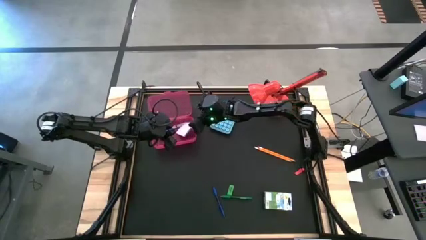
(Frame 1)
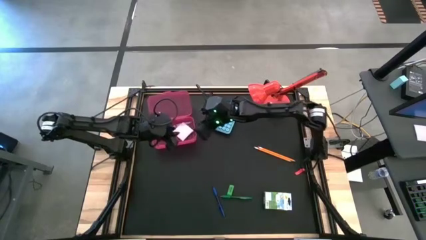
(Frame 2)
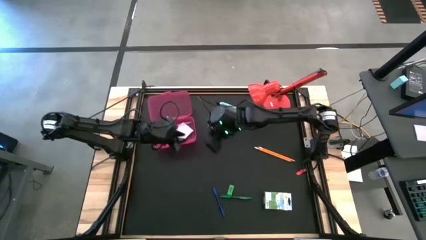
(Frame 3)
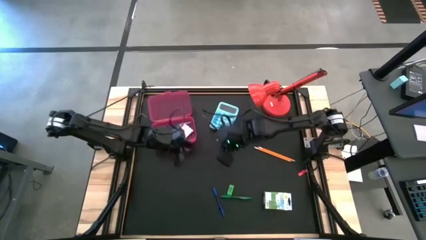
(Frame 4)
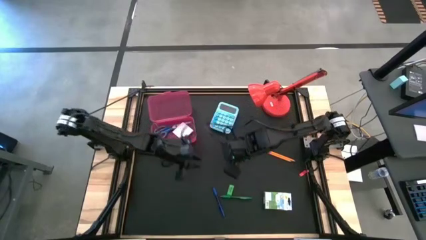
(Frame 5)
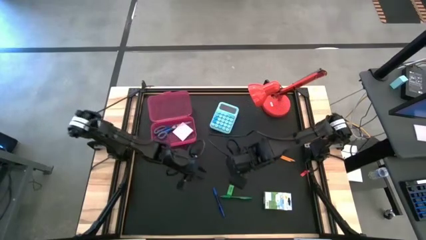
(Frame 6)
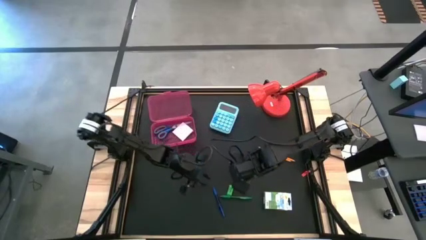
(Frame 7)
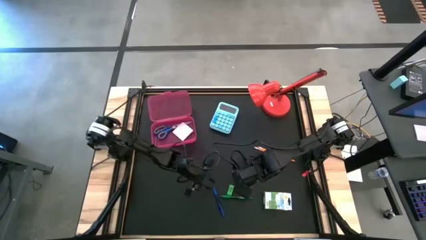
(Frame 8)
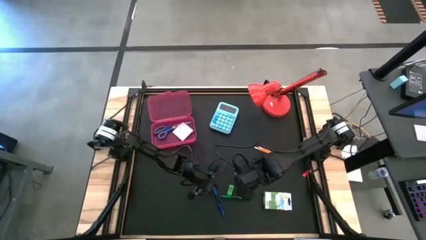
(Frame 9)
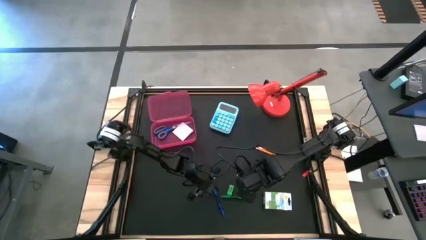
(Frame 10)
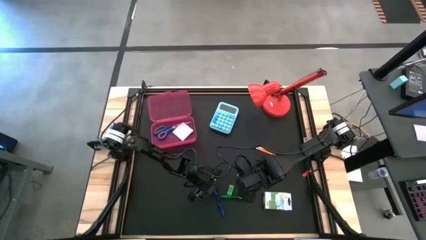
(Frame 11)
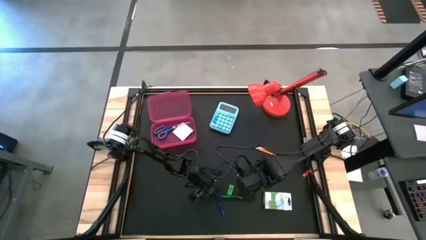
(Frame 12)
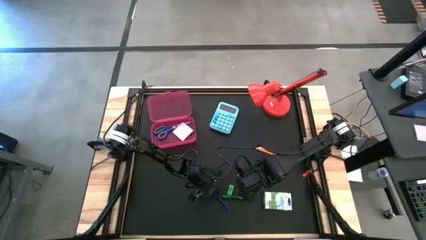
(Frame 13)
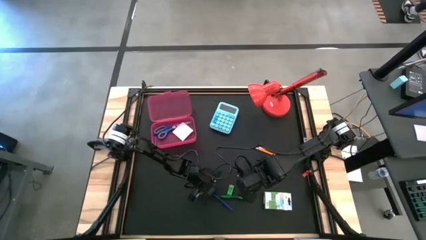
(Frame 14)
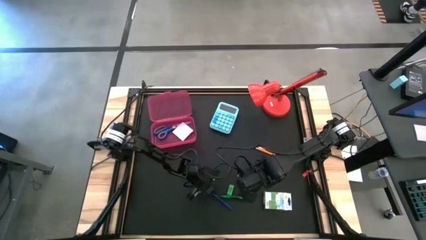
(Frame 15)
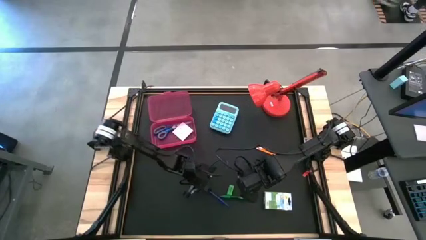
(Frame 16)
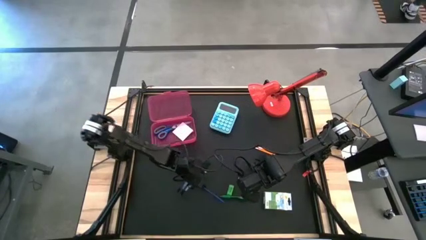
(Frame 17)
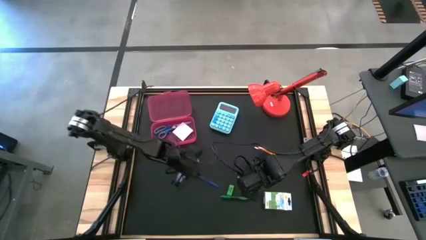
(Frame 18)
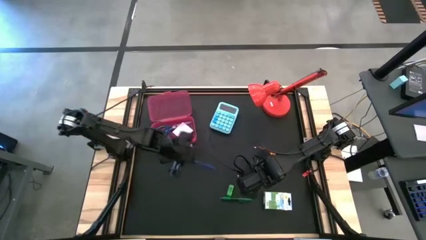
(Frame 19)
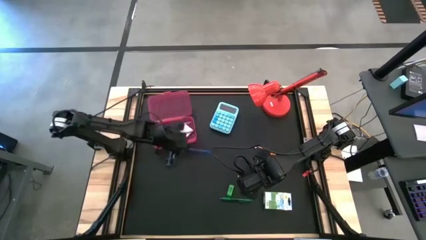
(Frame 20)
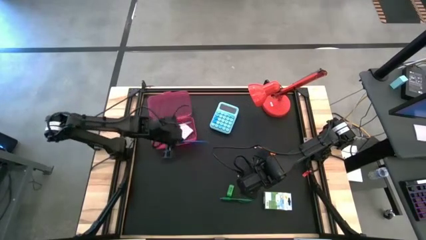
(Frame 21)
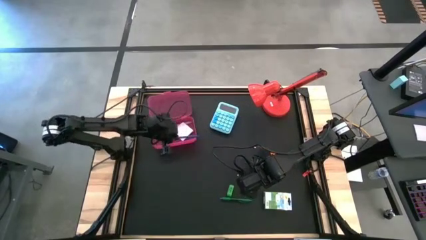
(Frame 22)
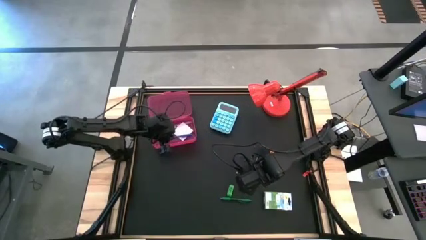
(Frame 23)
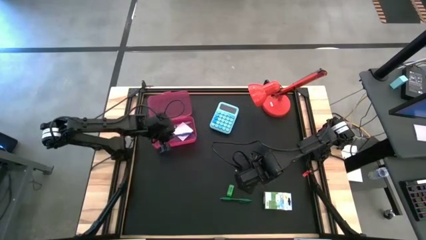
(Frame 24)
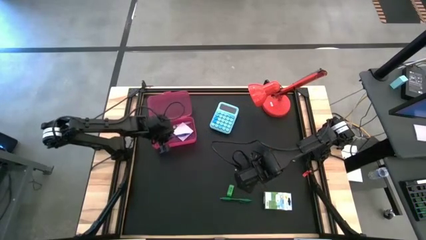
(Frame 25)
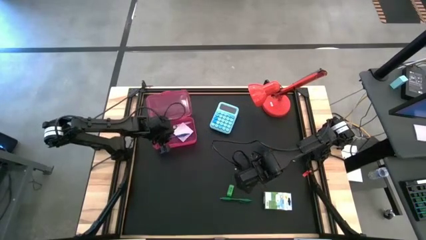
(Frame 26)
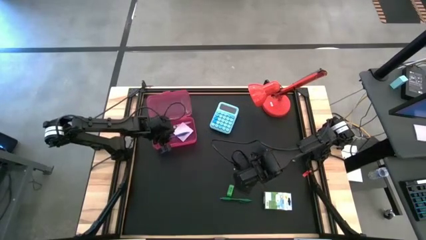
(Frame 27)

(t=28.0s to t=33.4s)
Task: Pack school essentials
Put the blue pen into the pink supply box

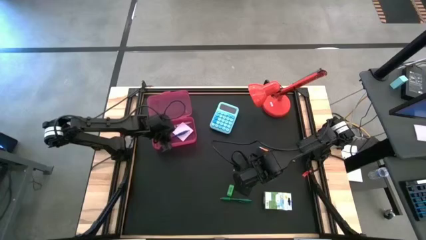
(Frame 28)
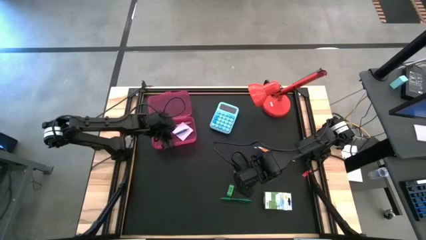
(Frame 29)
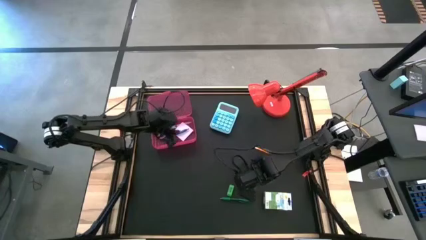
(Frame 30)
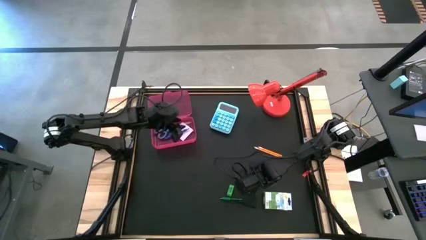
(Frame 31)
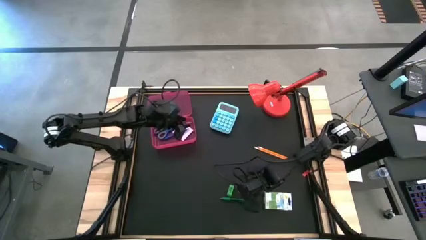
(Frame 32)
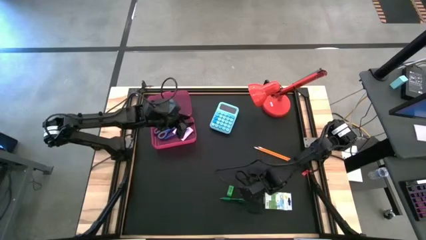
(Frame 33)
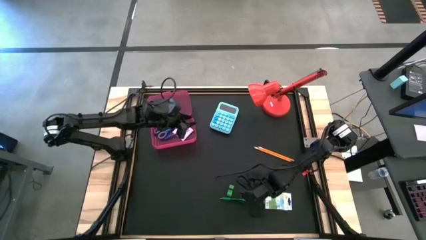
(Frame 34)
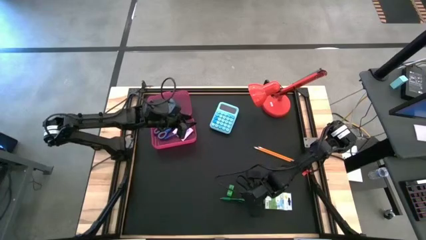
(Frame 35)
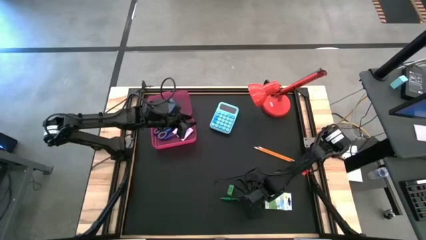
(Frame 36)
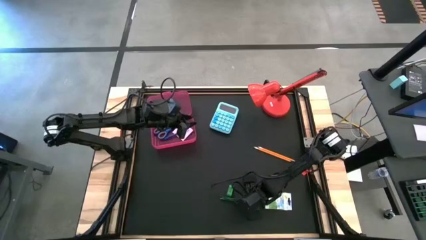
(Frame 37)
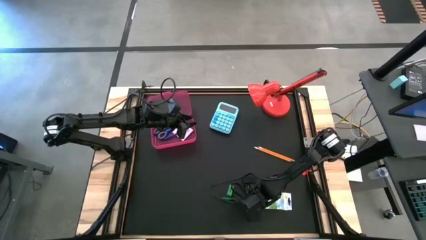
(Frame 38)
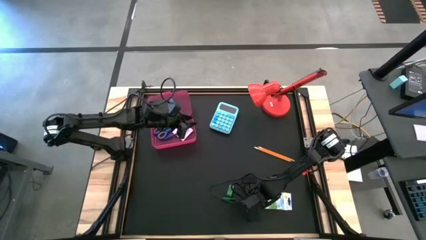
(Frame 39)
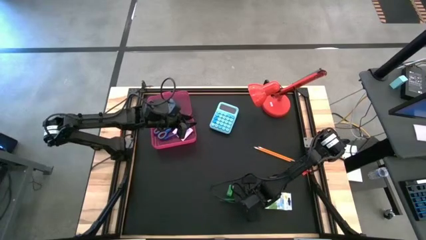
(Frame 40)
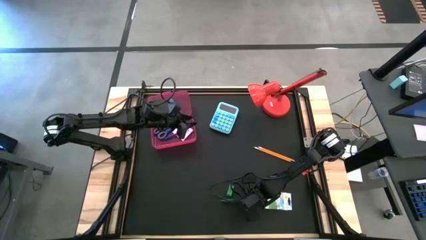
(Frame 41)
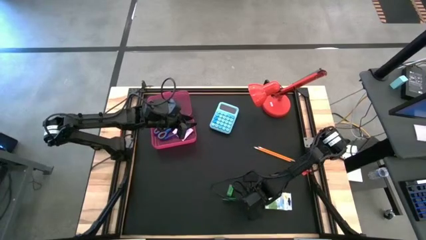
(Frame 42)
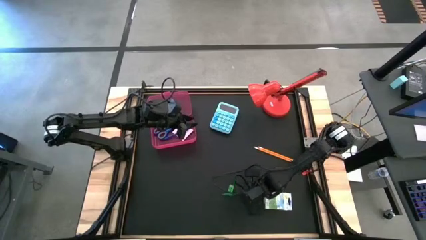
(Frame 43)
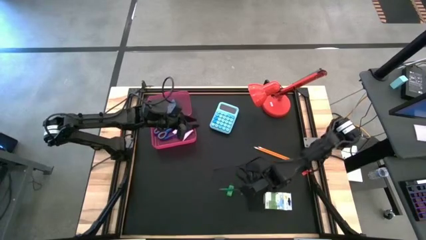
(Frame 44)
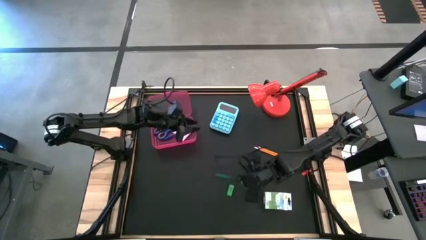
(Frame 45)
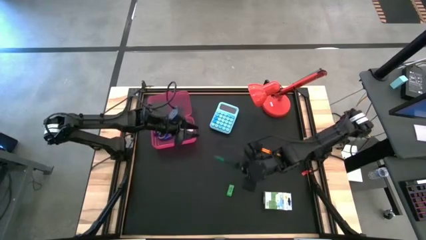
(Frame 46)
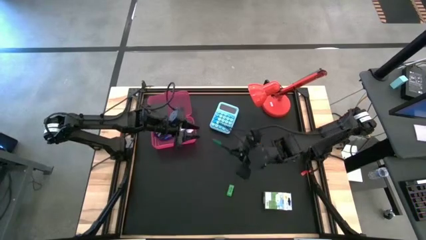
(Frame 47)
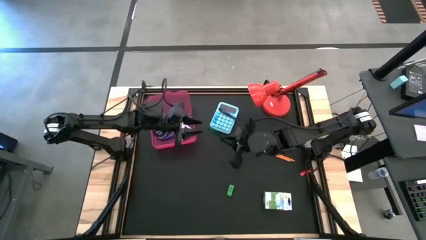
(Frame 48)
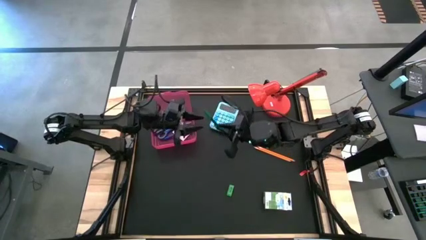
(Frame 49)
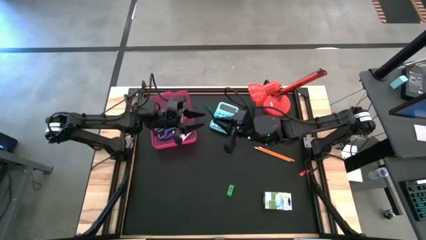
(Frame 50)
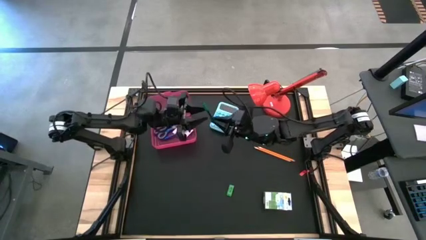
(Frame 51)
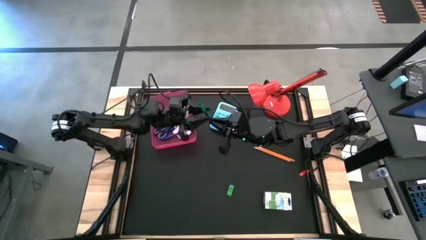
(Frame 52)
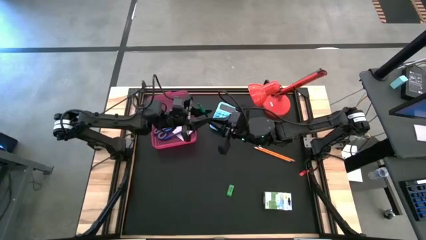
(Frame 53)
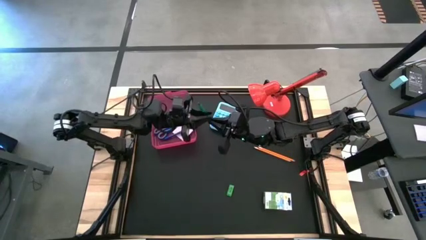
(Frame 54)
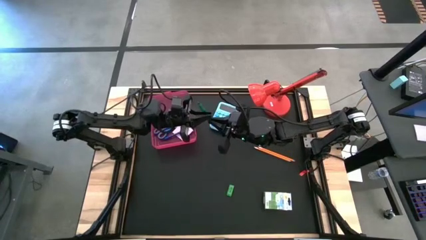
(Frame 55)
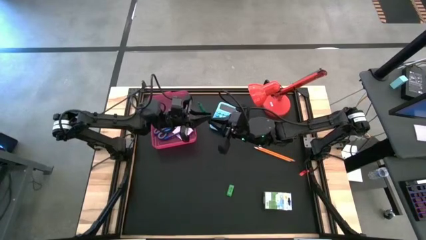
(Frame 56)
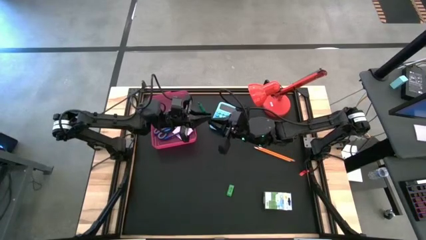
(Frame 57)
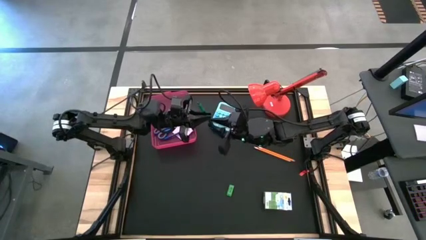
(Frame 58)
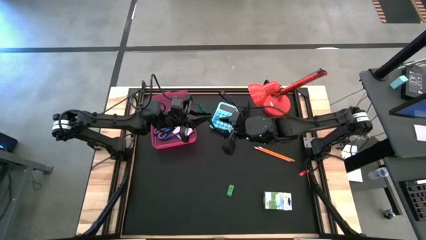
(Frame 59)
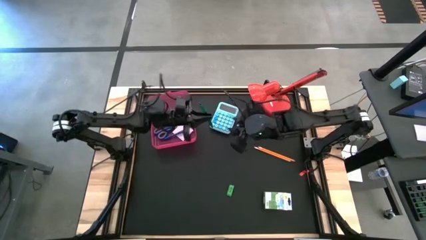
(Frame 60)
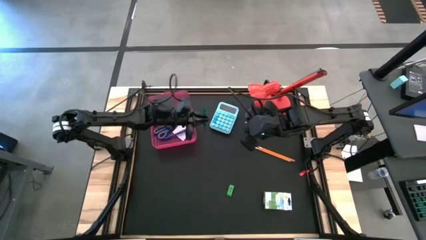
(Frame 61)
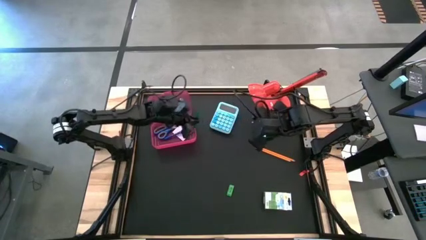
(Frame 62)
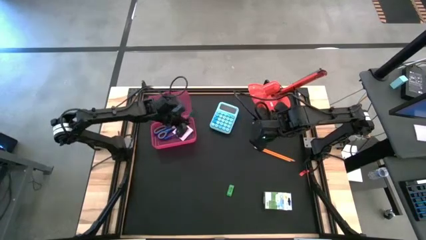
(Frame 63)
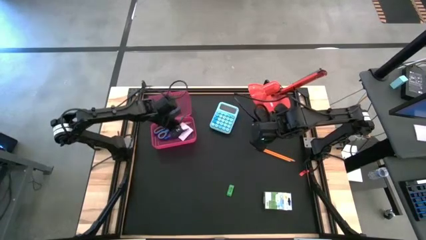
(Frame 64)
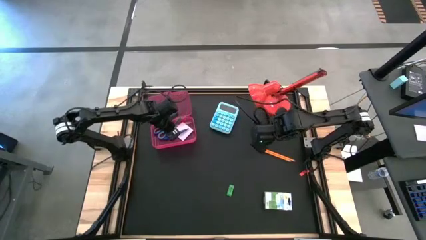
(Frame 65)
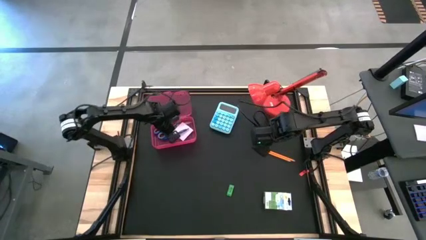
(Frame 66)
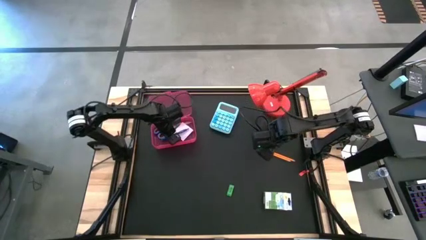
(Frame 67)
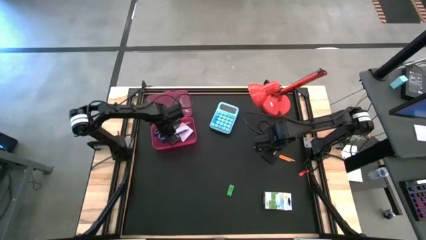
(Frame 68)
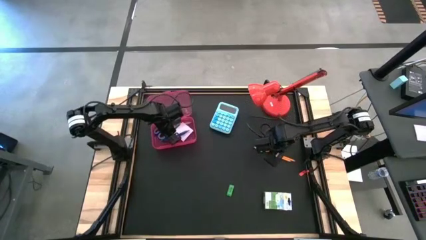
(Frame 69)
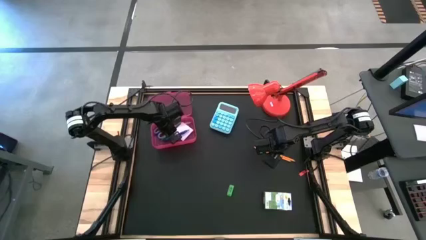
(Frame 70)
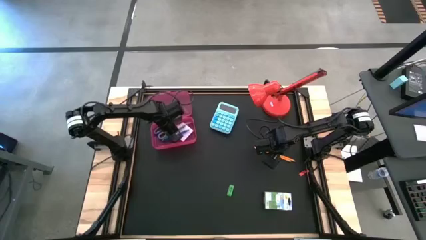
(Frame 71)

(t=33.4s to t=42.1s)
Put the green pen into the pink supply box

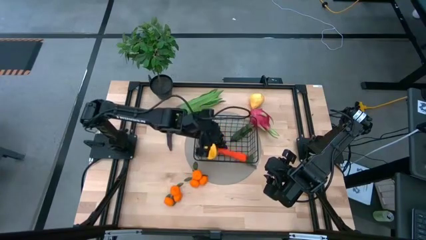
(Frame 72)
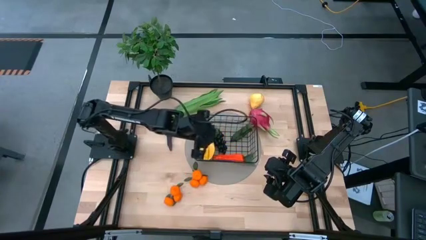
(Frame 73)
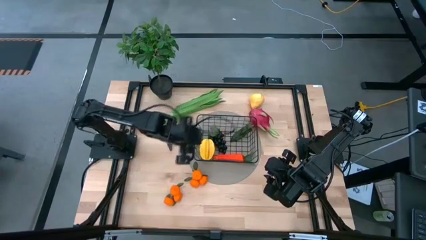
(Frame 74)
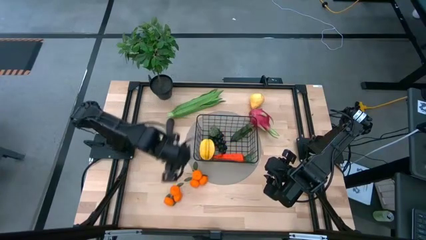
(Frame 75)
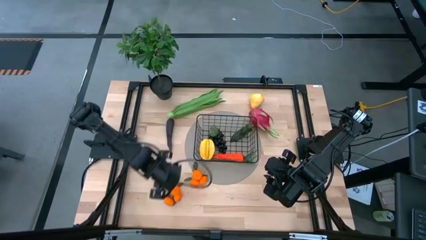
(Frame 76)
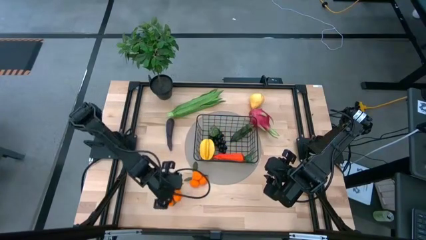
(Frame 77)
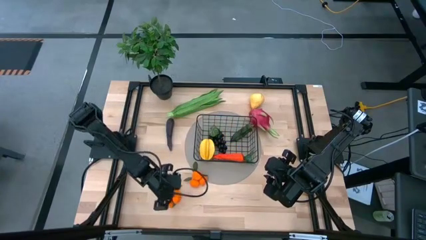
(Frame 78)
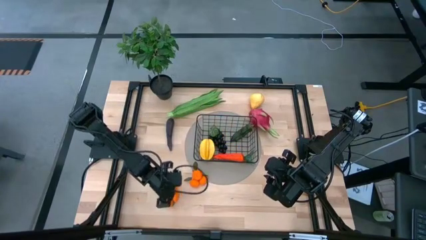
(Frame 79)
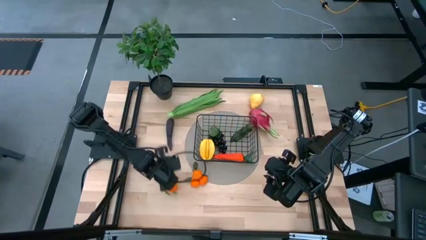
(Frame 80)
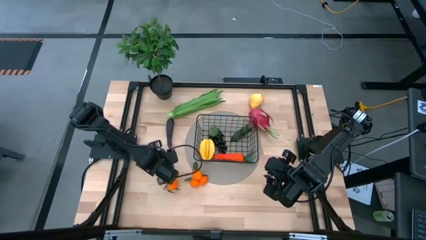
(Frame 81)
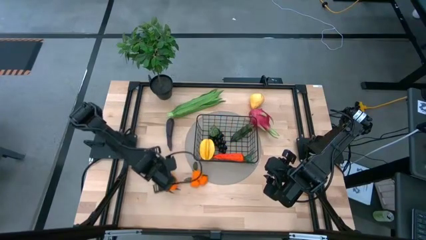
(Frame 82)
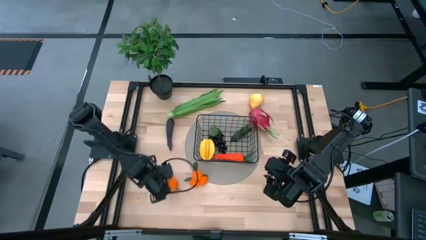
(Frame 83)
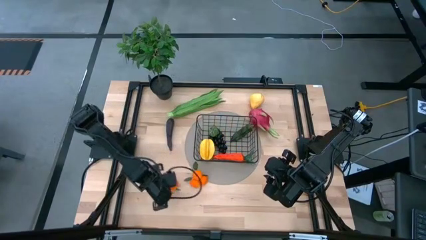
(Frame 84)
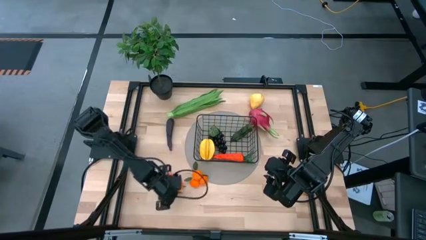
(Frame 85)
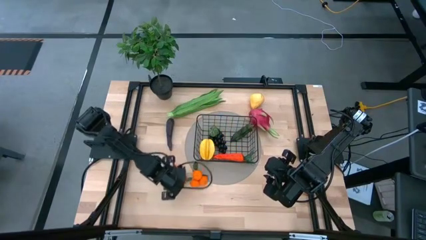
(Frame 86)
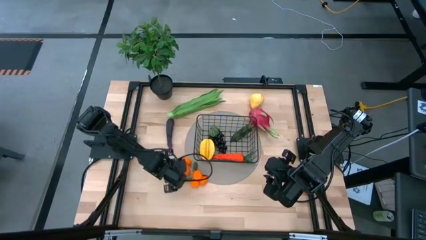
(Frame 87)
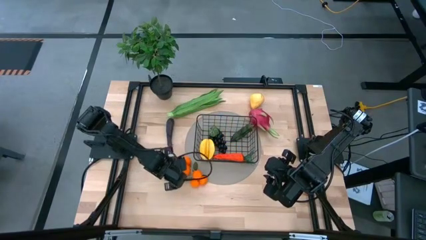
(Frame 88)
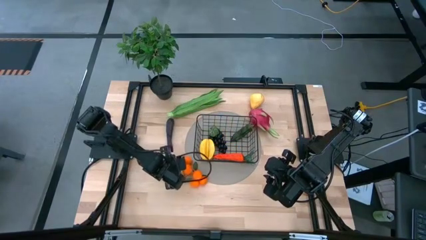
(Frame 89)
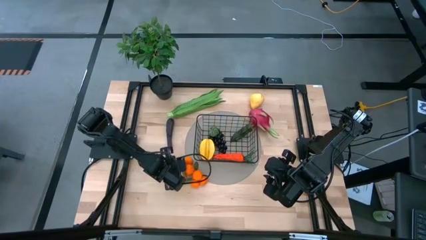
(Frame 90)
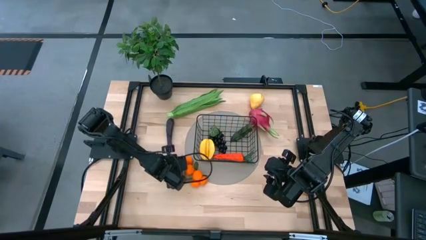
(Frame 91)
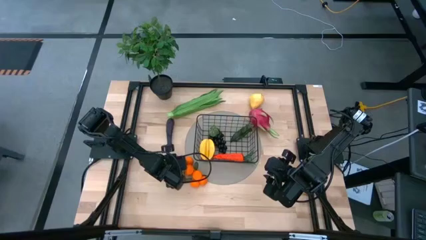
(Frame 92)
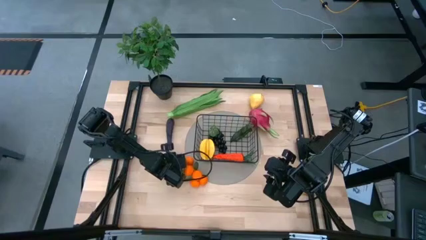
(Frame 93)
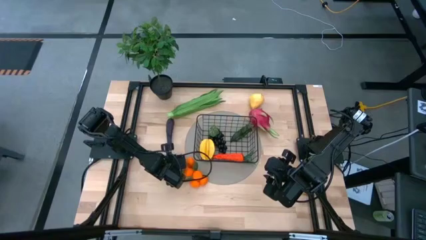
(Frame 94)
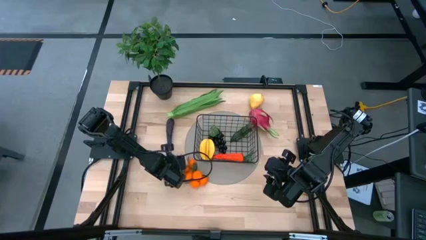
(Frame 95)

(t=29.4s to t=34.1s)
Task: Build produce basket
Put the left orange tangerines into the black wire basket
